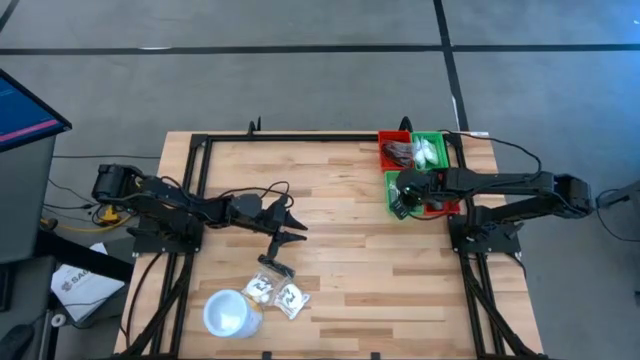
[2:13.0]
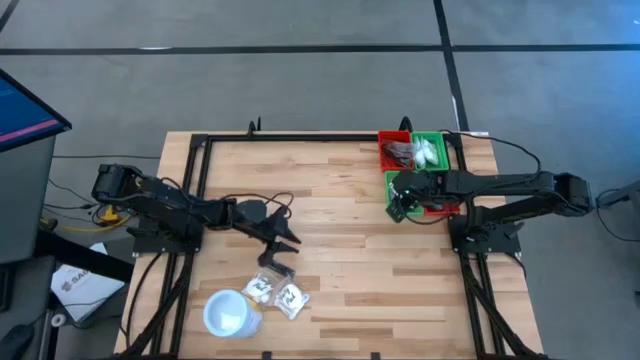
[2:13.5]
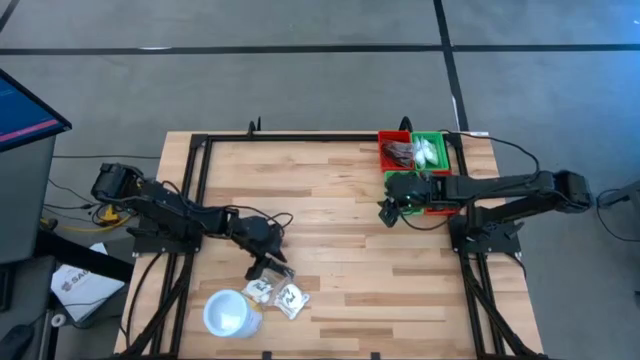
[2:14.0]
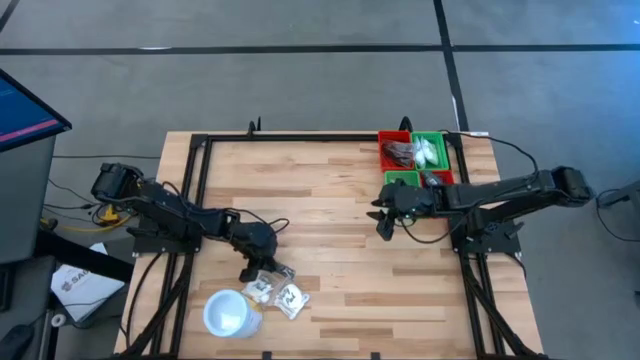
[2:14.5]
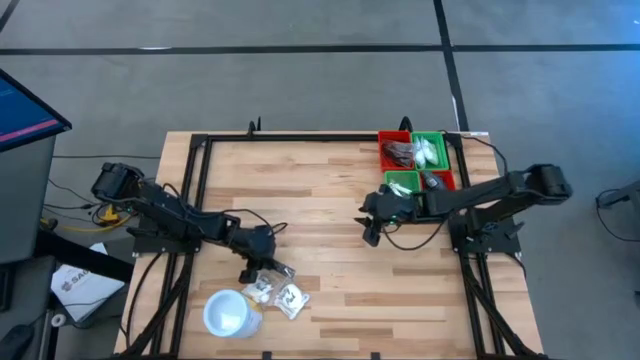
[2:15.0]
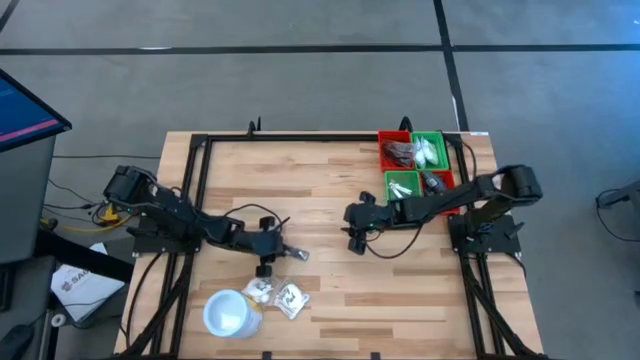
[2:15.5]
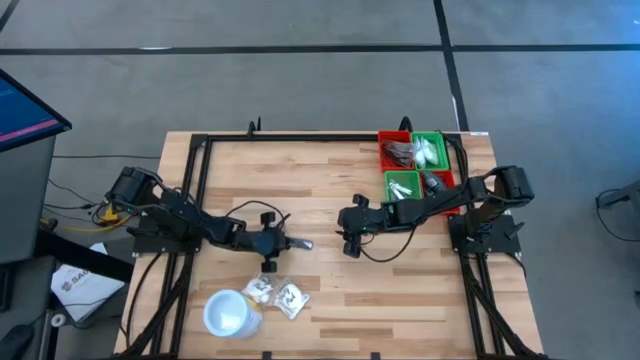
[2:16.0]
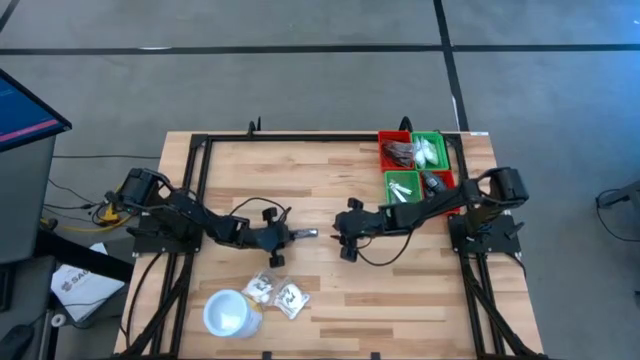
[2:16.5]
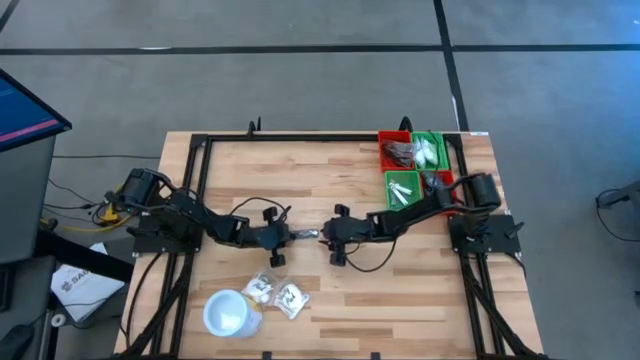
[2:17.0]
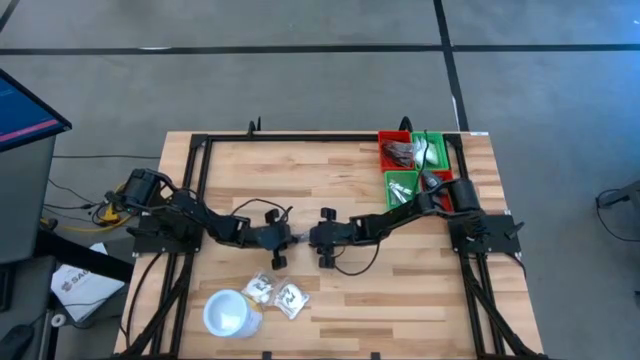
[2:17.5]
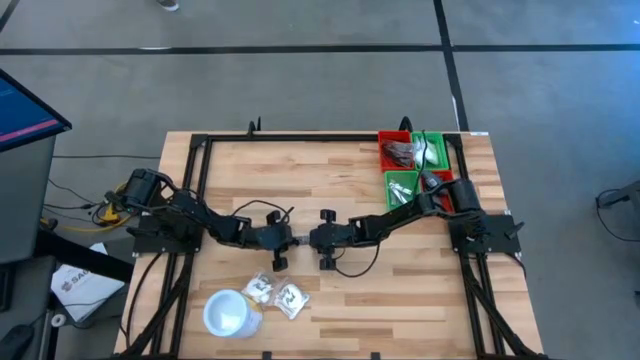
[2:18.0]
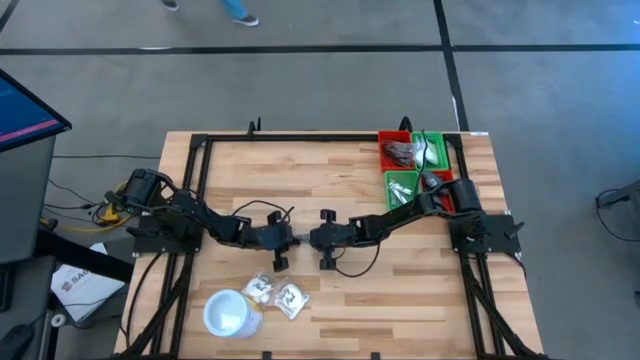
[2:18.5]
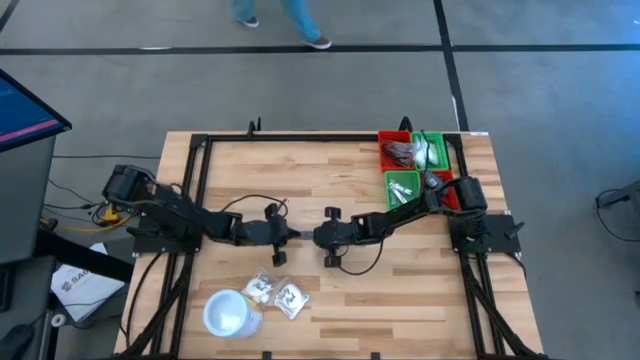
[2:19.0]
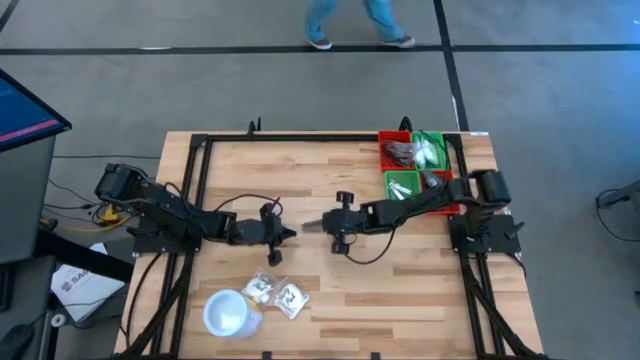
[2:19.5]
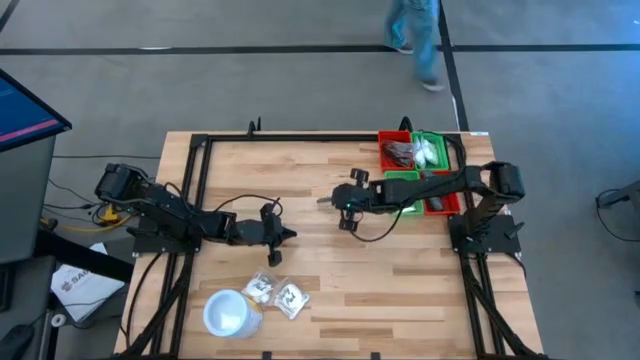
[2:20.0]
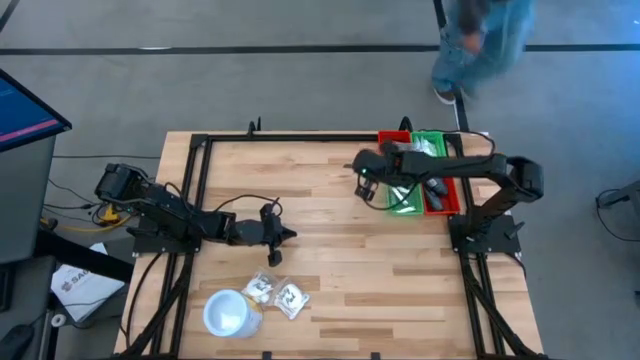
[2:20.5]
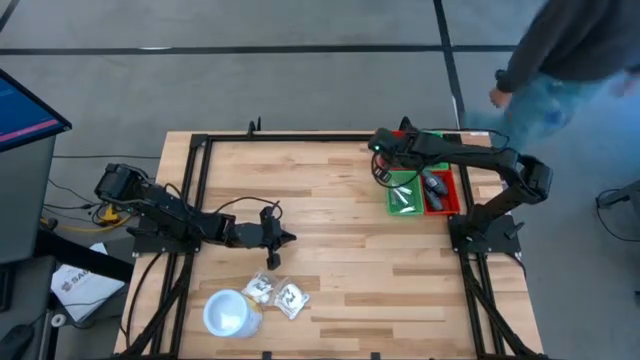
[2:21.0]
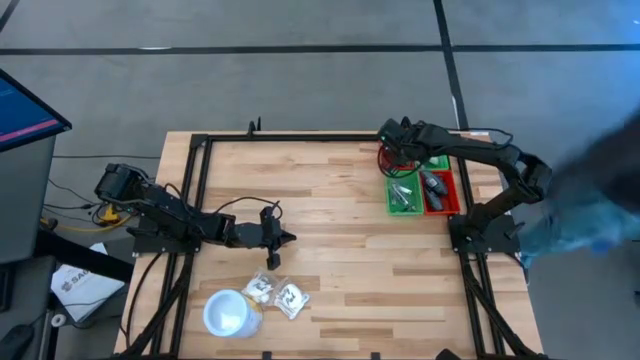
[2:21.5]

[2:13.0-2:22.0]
Task: Pick & Place Travel size toiletries
Put the black hair comb into the top red bin

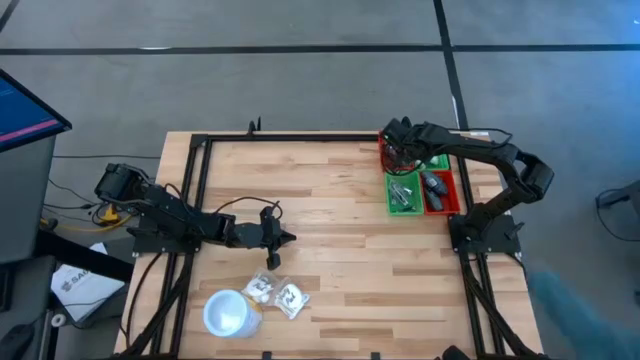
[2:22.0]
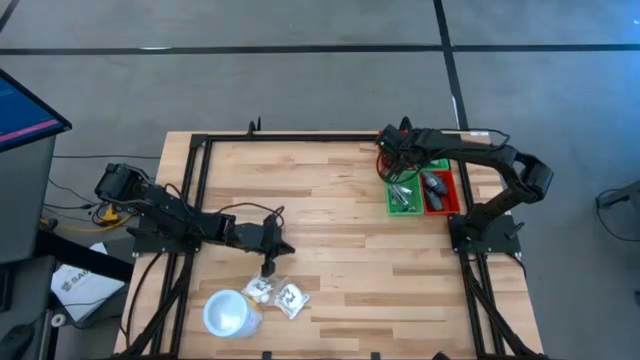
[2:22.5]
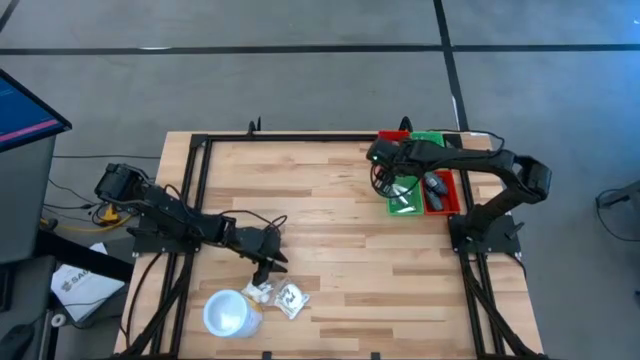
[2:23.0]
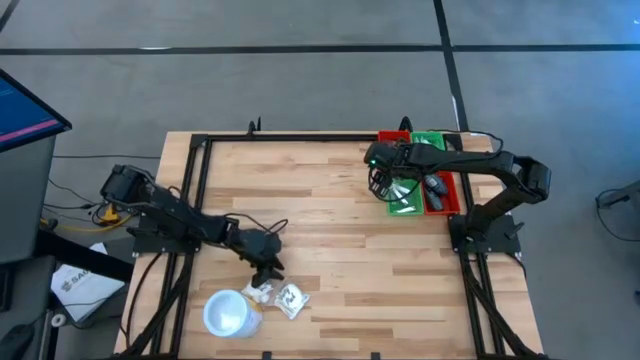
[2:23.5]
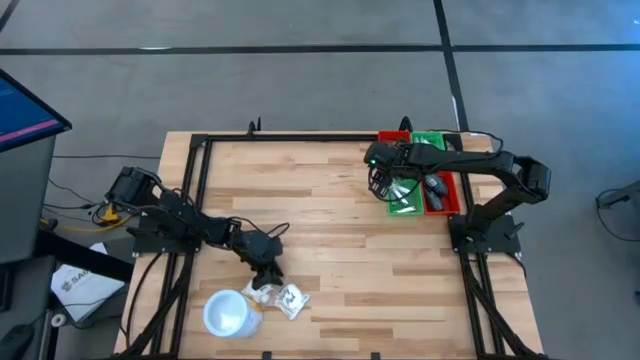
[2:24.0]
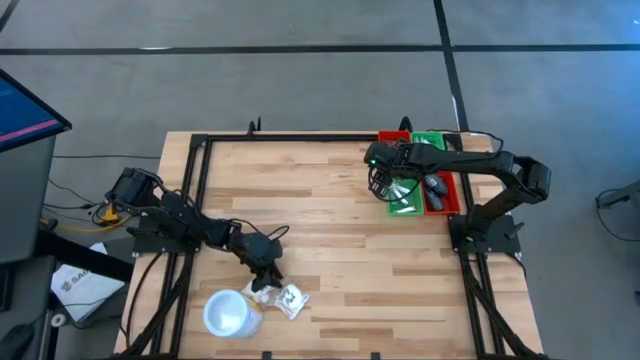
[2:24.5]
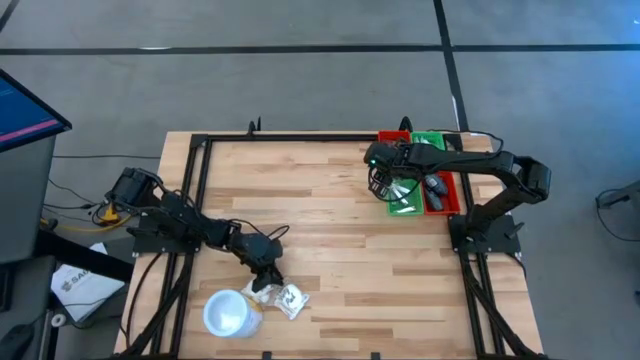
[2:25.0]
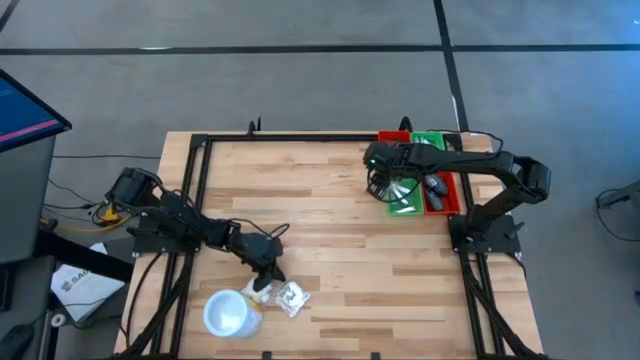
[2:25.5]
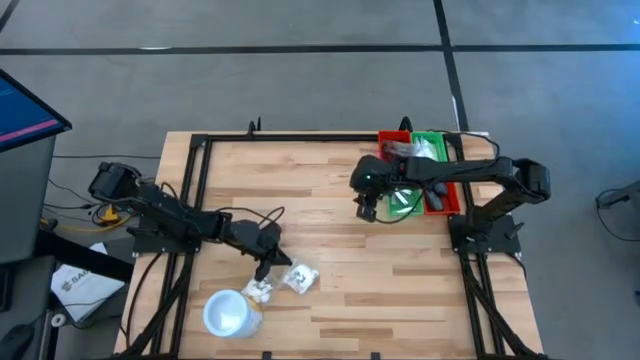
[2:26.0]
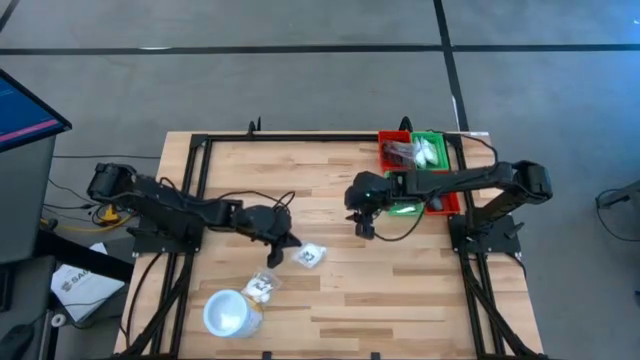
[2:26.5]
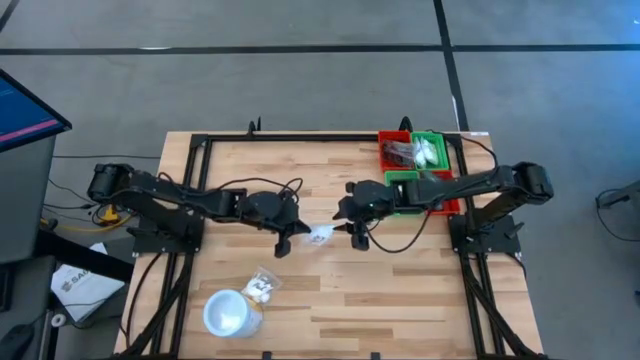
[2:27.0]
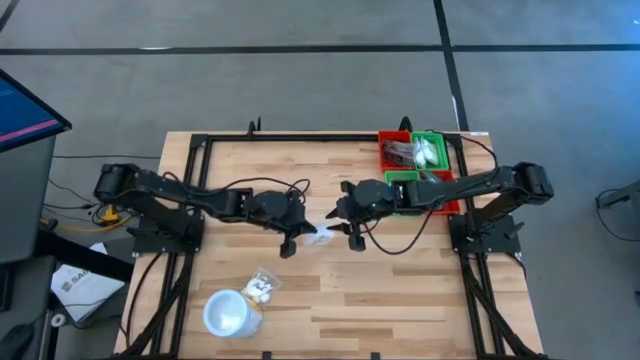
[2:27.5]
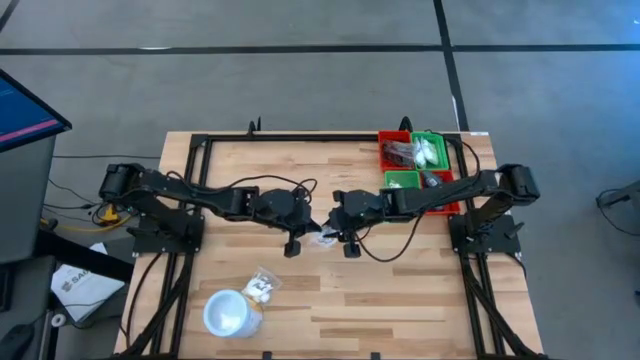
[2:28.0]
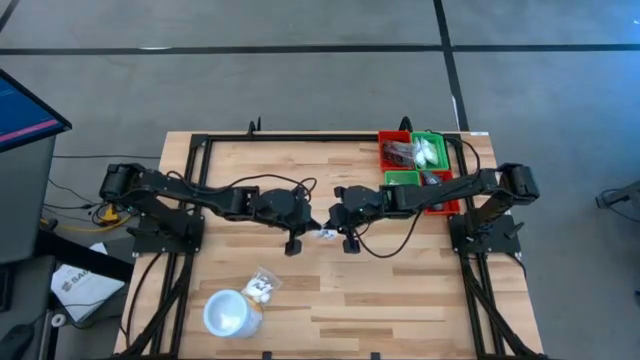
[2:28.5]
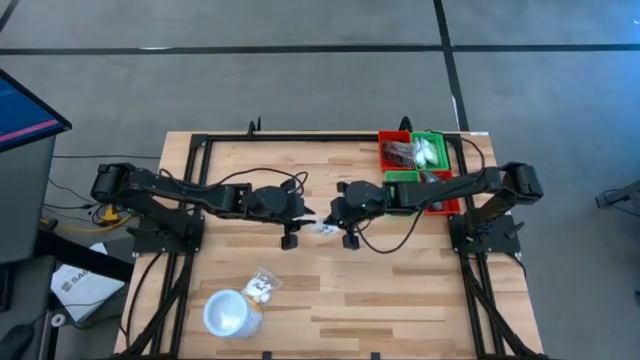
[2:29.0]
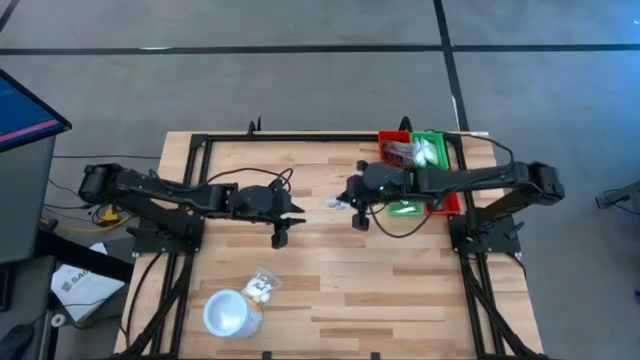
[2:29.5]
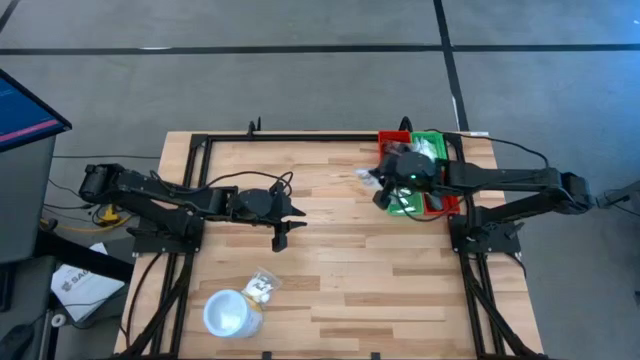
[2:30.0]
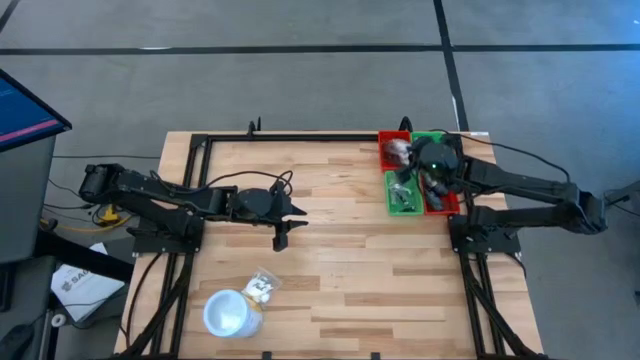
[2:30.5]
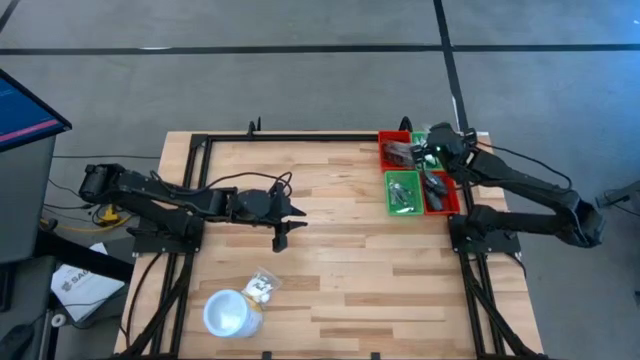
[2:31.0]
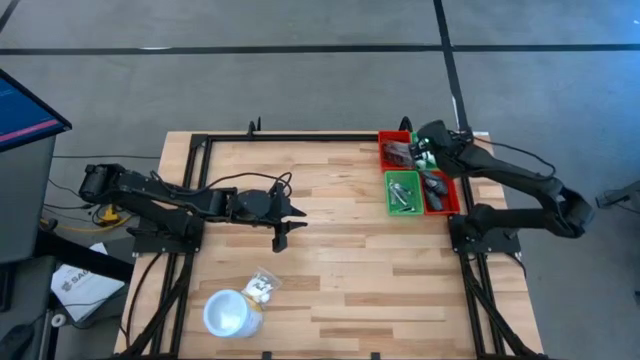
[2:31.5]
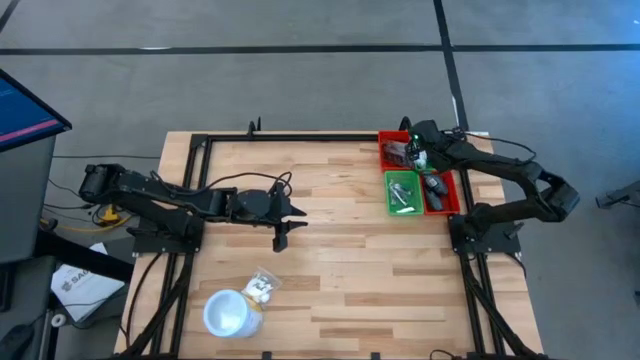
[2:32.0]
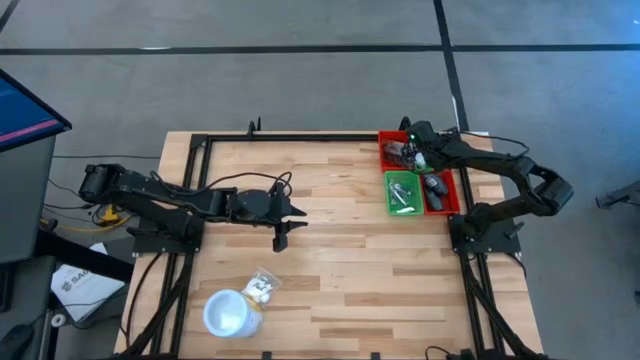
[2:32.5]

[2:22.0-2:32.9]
Put the white cotton pack into the top green bin
